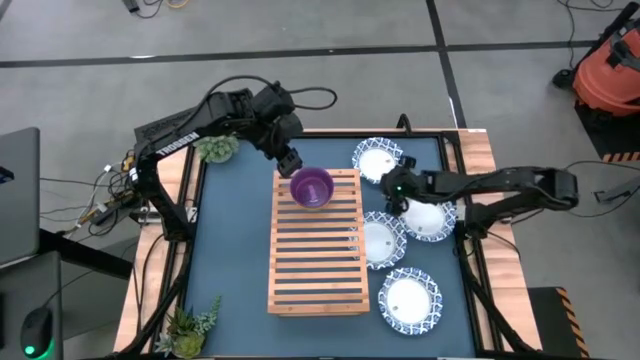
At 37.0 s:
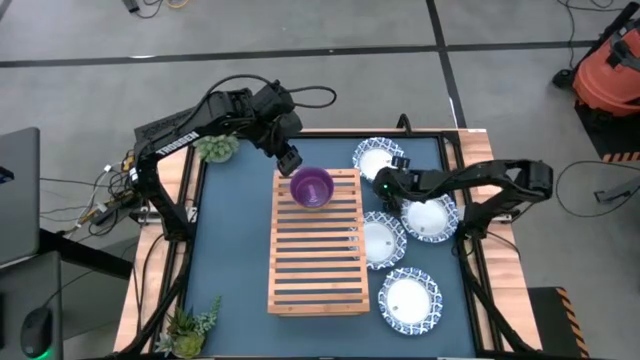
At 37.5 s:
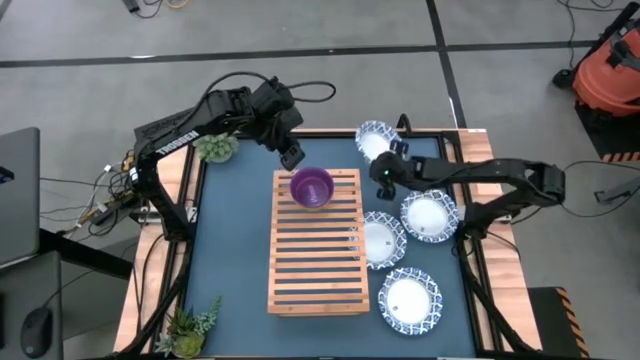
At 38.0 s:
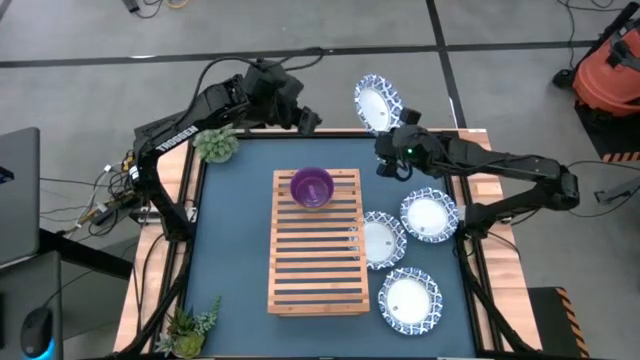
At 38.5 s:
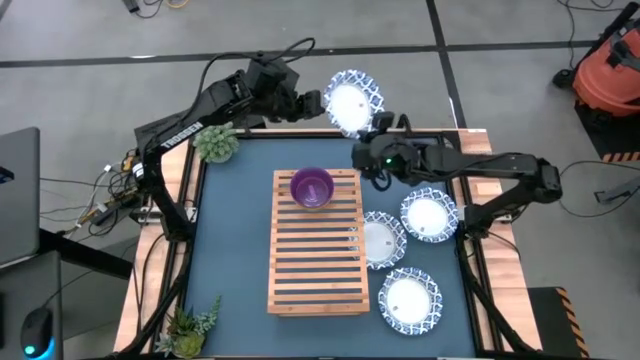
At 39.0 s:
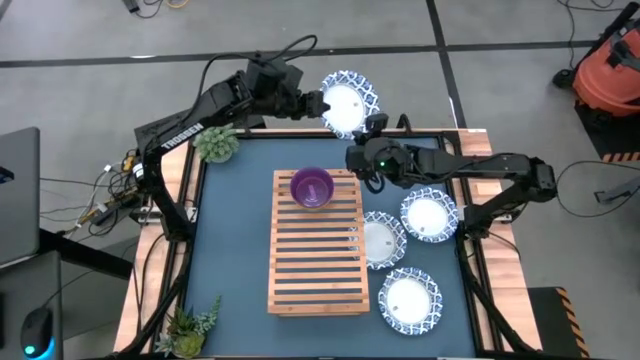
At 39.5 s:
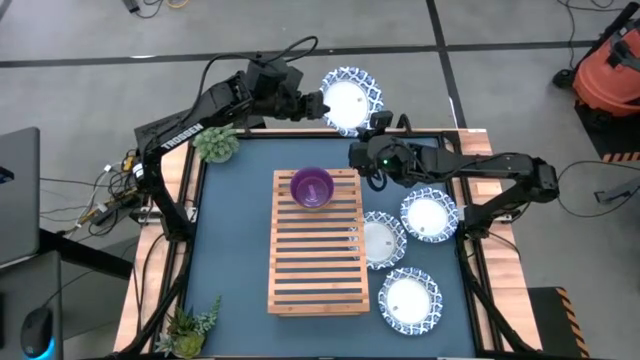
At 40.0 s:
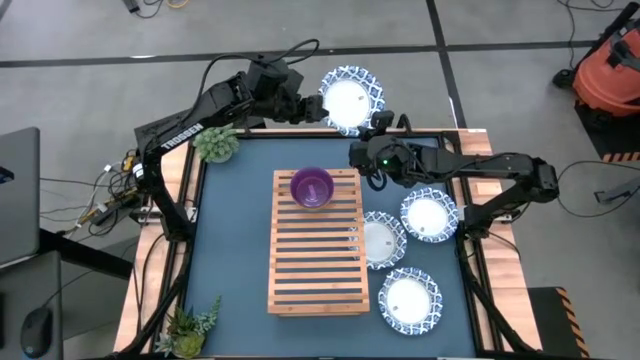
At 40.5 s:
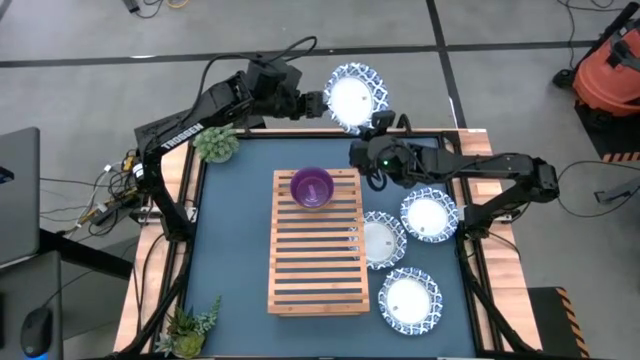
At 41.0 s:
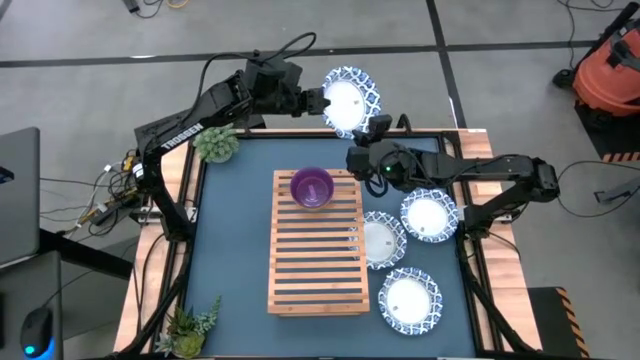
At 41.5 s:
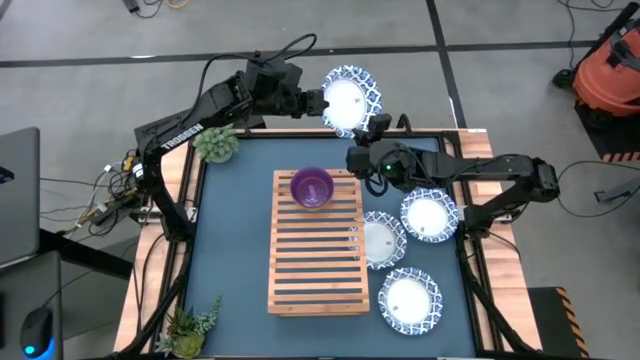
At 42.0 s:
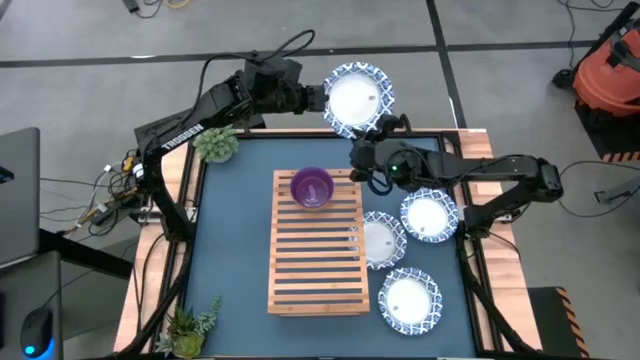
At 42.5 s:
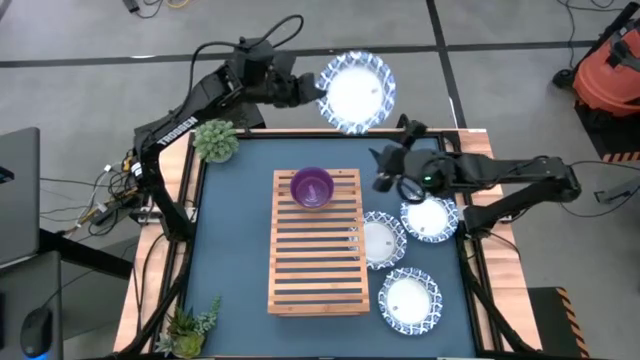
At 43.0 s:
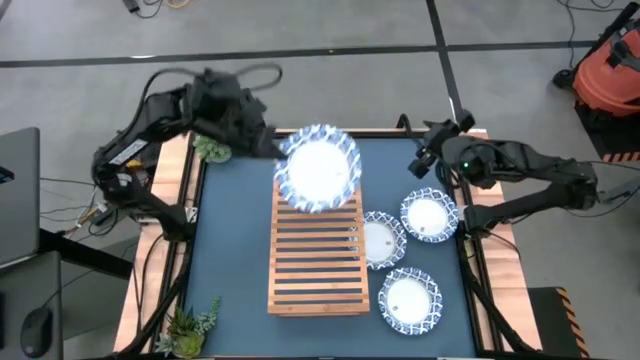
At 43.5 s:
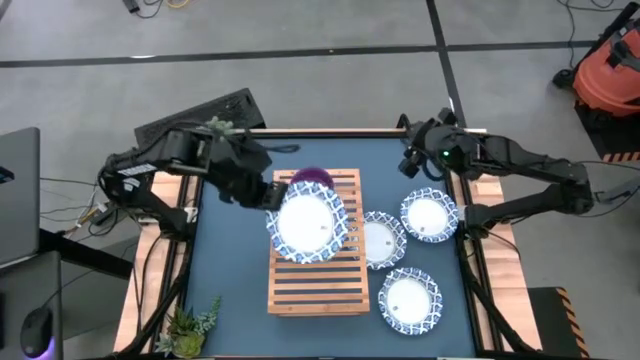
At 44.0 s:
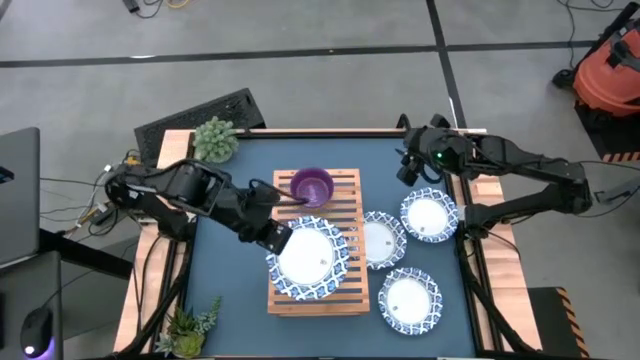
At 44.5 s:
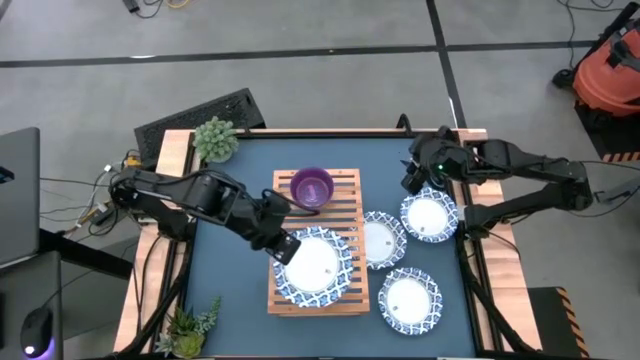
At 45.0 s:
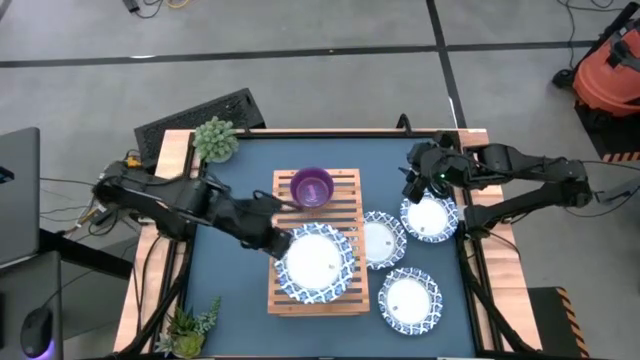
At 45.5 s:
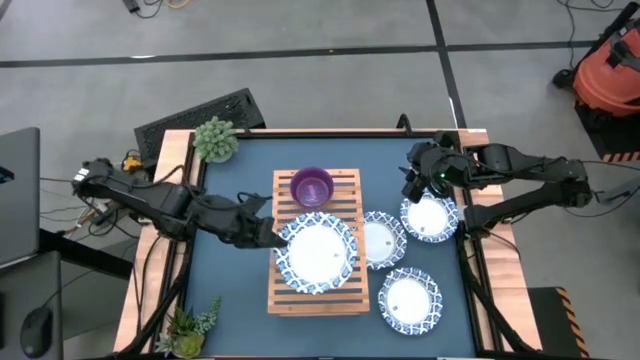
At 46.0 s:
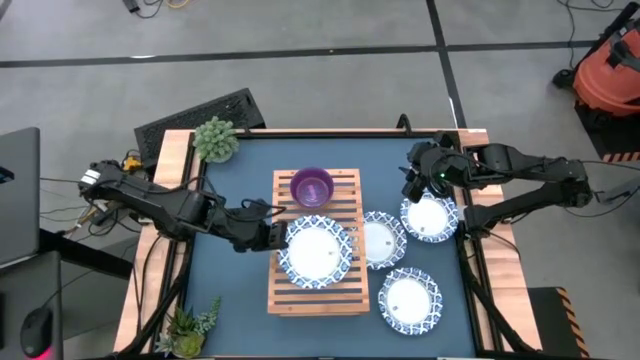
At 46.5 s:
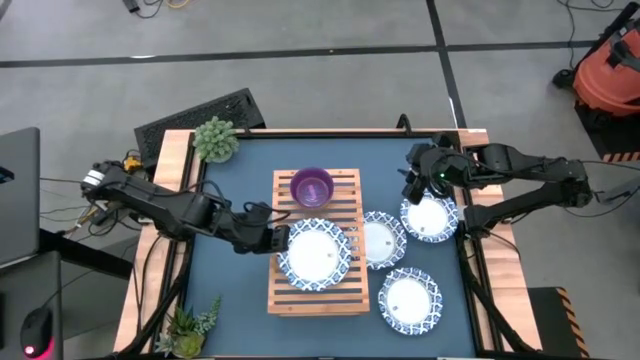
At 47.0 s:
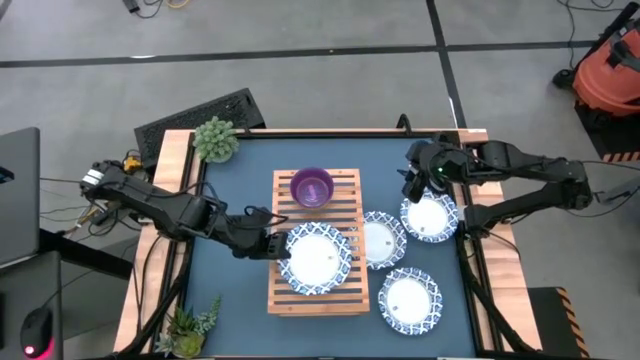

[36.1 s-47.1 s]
Task: Place and stack bowls onto a shelf
Put the top left big white and blue bowl on the shelf

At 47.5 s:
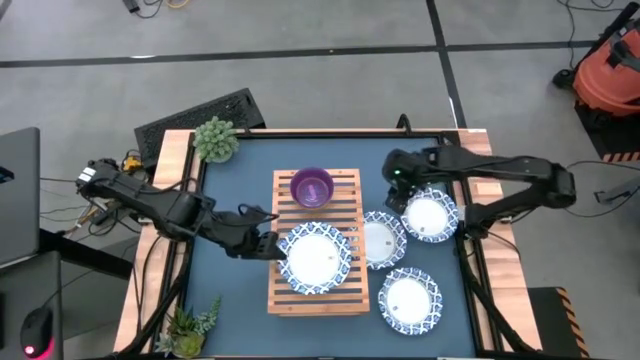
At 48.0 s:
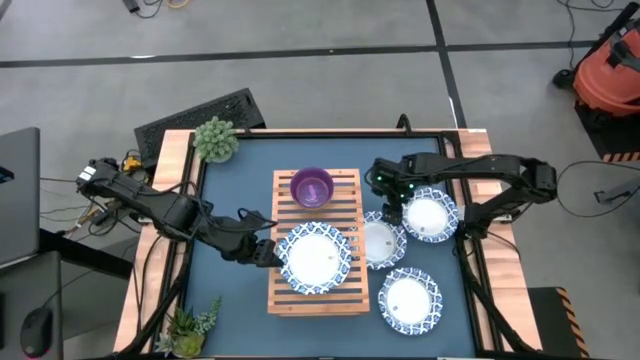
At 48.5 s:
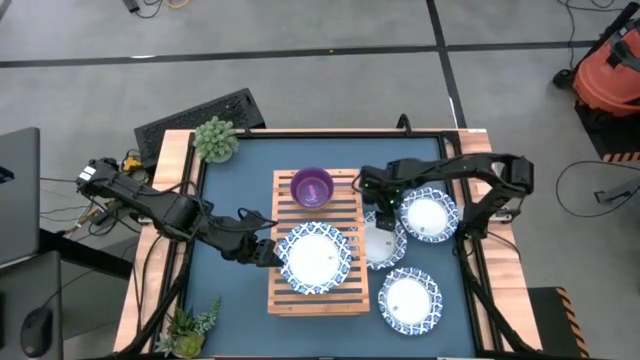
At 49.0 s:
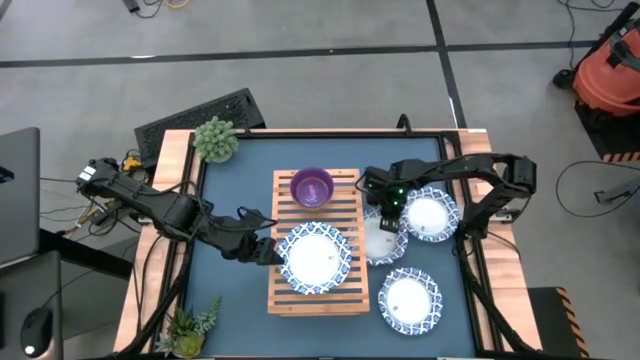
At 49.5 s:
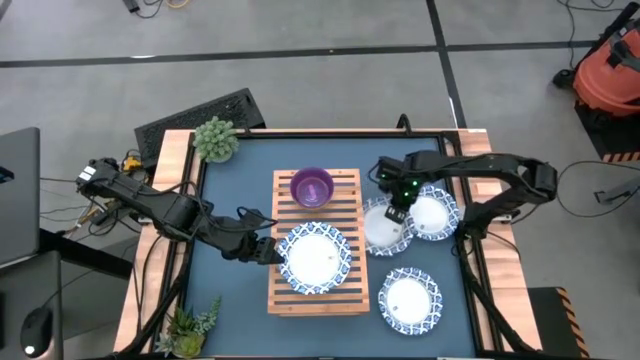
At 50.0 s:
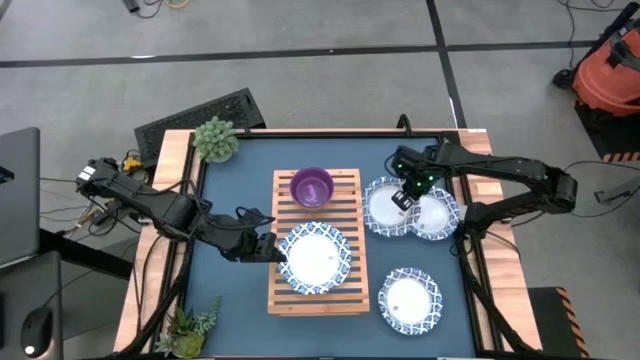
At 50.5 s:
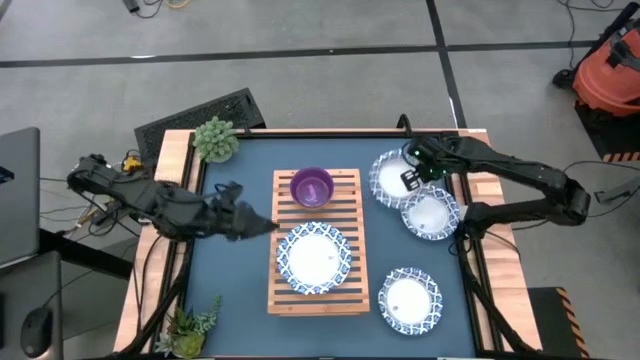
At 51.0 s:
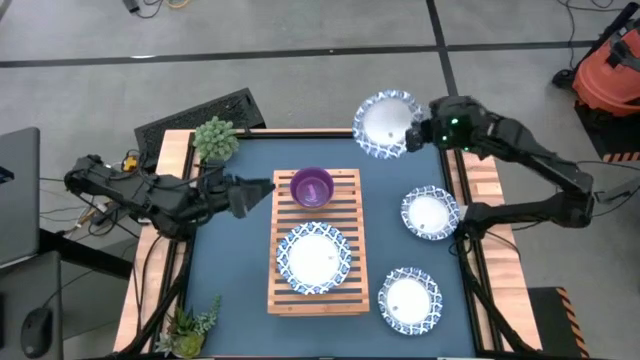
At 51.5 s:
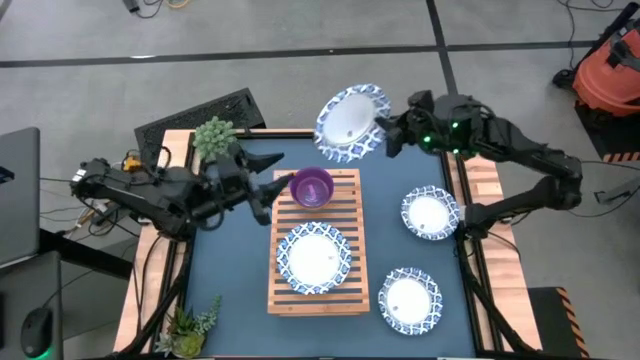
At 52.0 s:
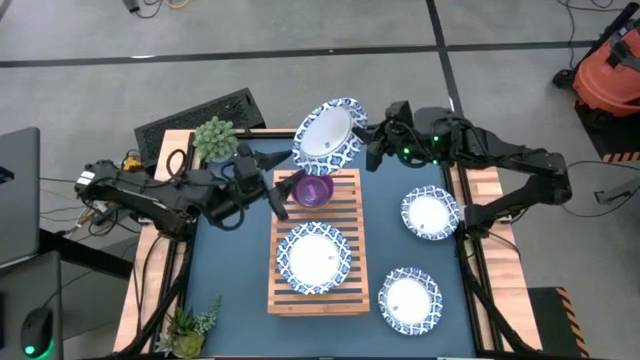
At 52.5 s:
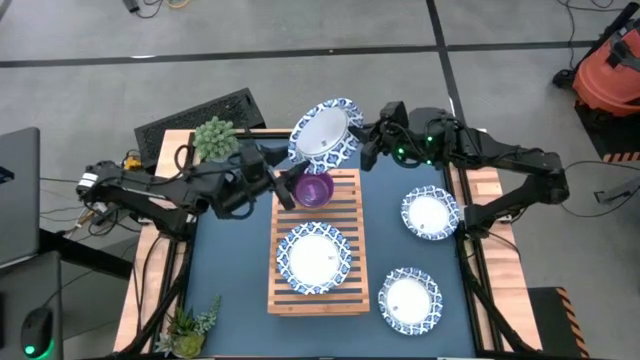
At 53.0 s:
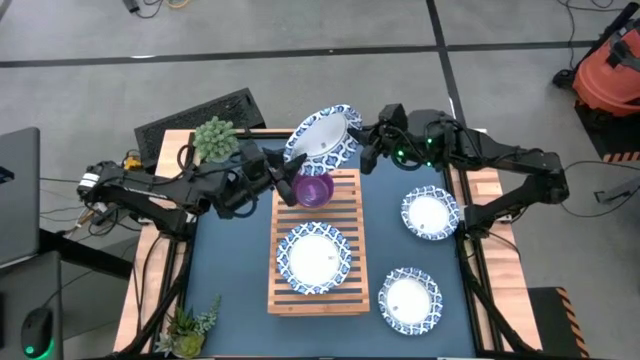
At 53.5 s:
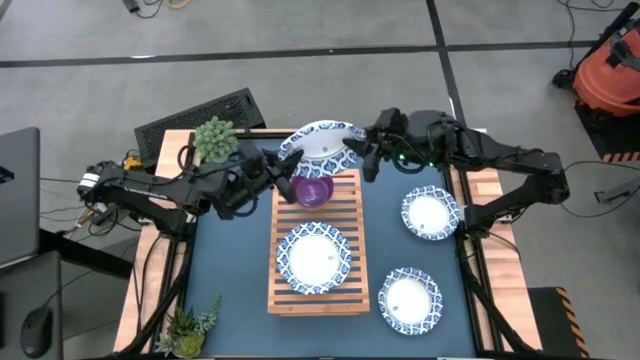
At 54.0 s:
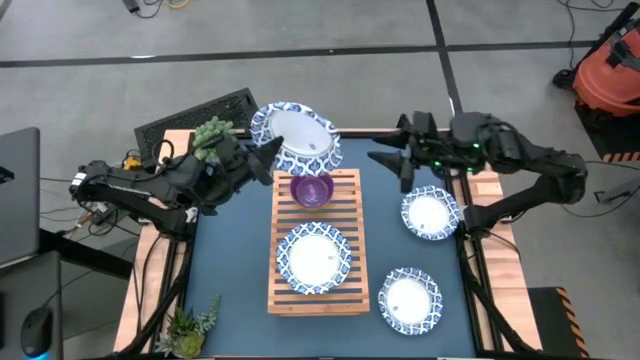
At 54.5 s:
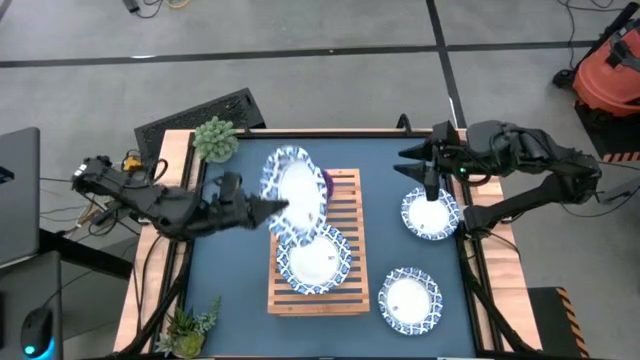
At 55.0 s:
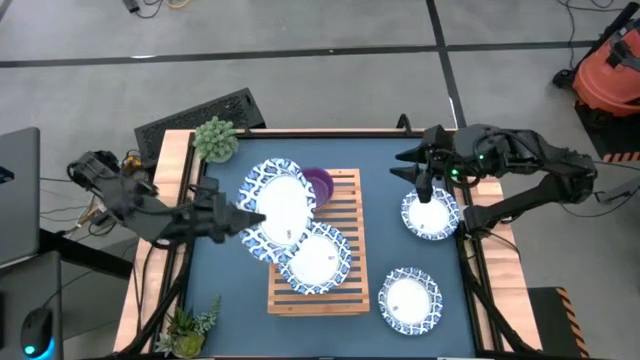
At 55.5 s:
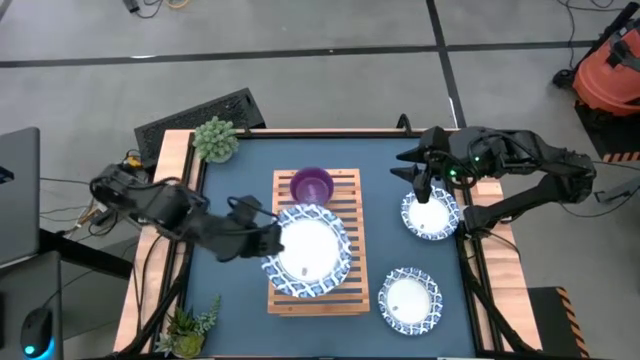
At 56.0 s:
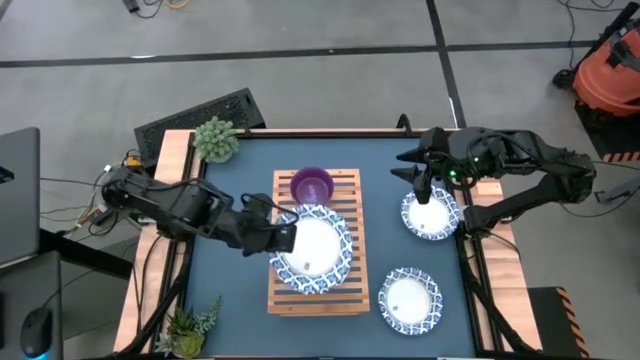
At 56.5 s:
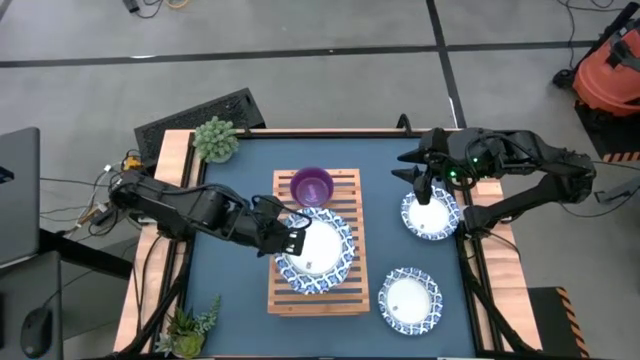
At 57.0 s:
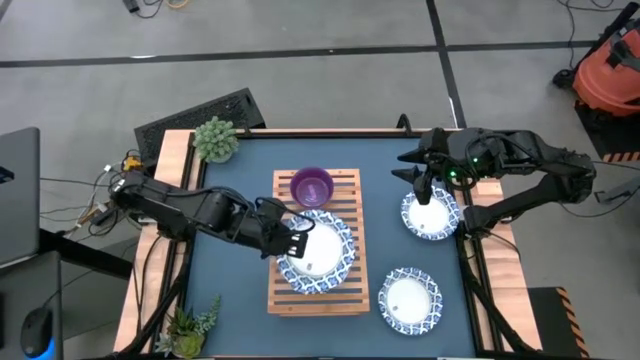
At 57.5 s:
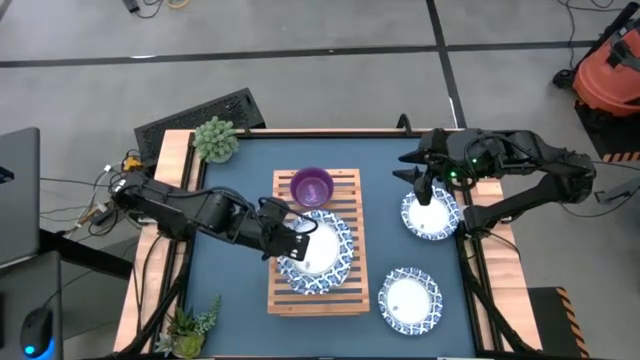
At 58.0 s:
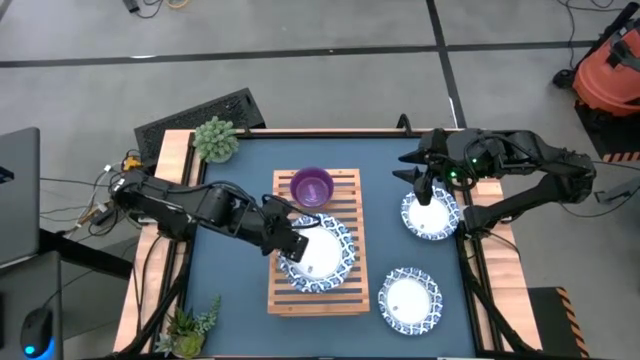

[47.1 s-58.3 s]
Stack the middle left big white and blue bowl on top of the big white and blue bowl
